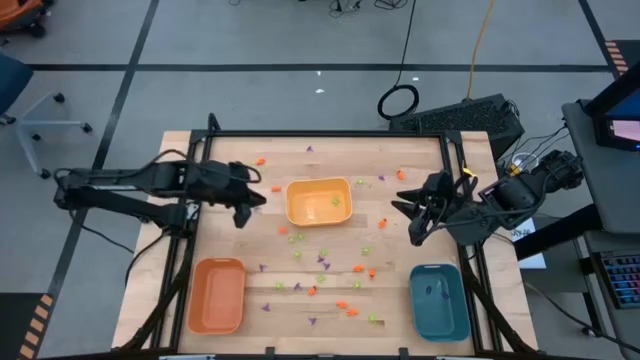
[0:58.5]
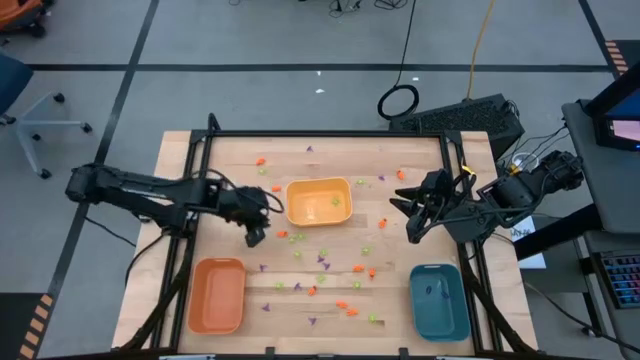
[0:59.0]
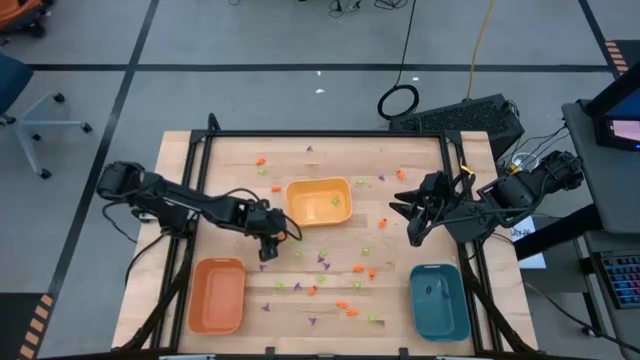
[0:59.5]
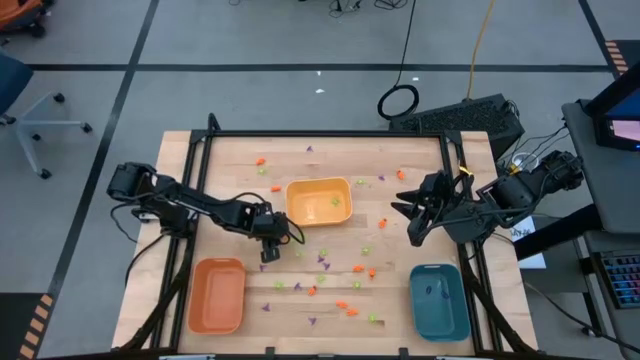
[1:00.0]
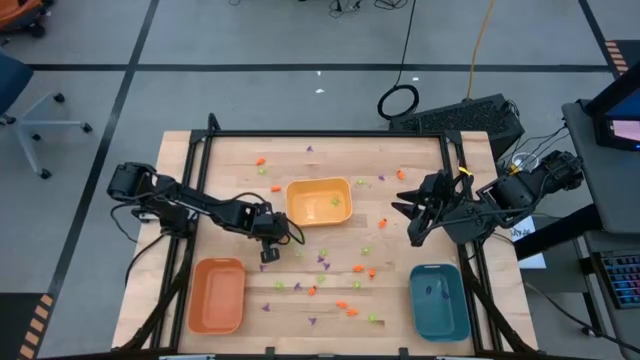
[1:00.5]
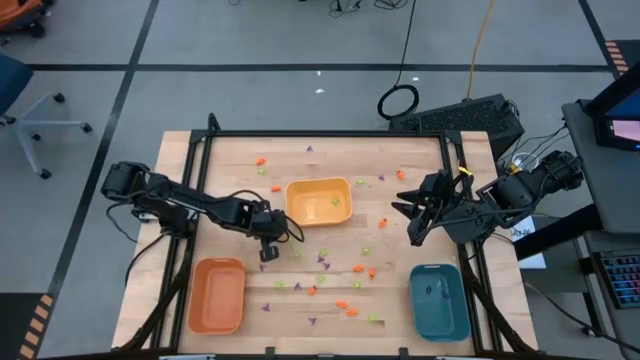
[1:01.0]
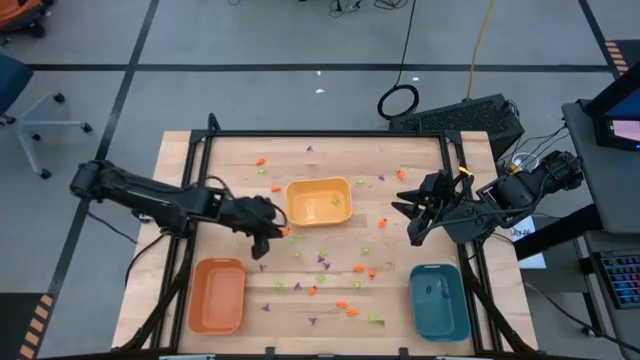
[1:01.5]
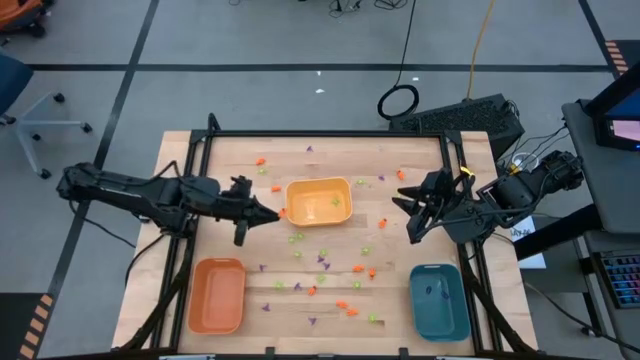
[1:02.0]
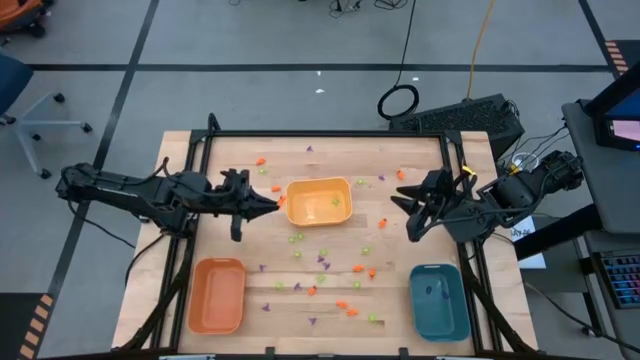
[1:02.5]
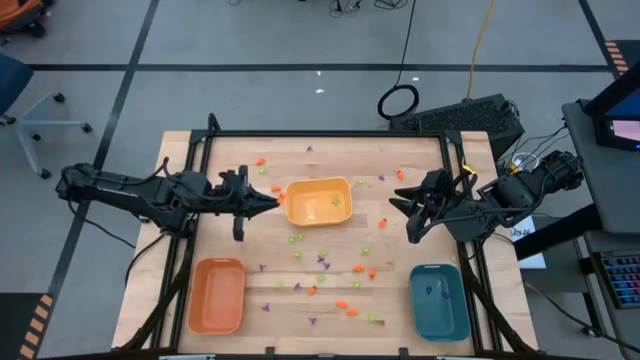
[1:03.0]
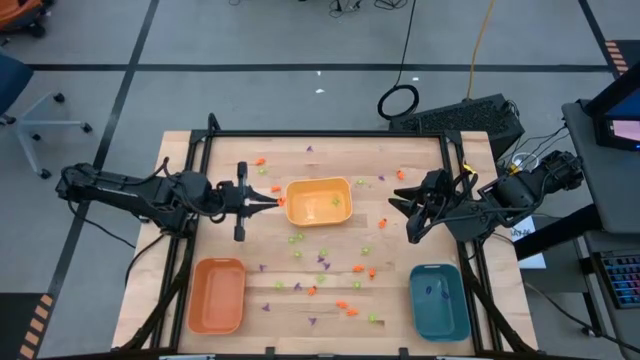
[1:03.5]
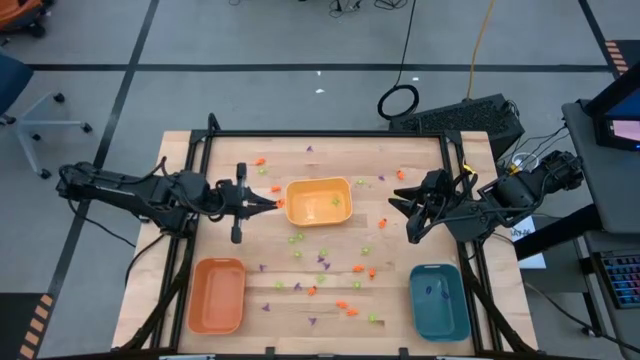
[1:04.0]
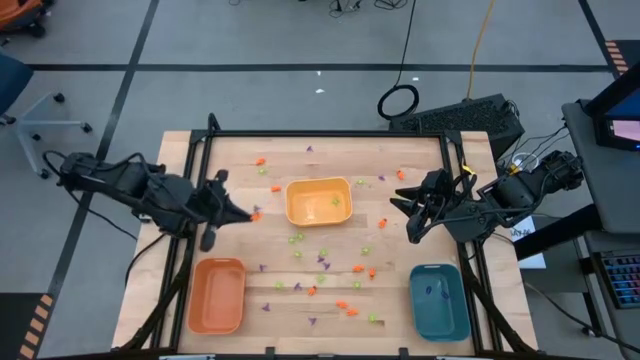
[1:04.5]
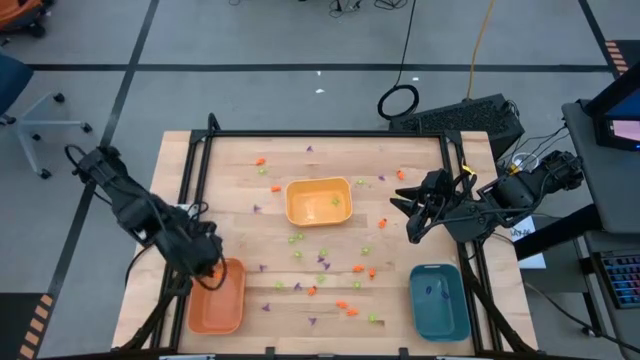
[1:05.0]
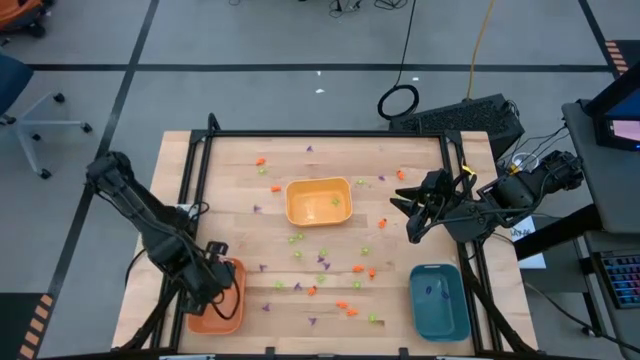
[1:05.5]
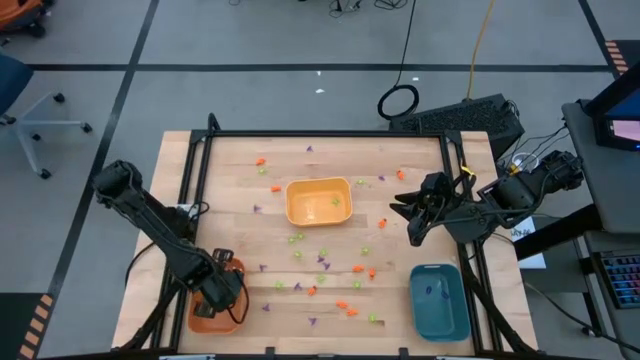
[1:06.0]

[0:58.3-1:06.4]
Task: Sort Halloween decoration
Put the orange skeleton toy into the orange bin

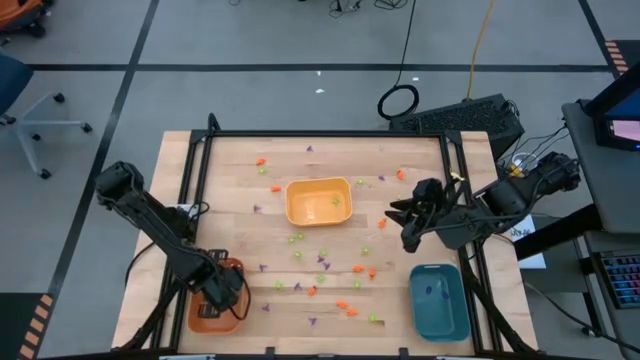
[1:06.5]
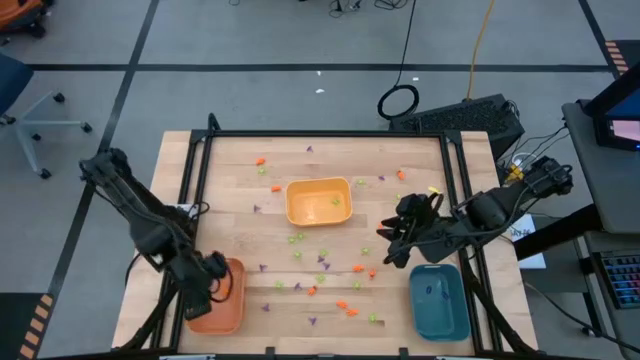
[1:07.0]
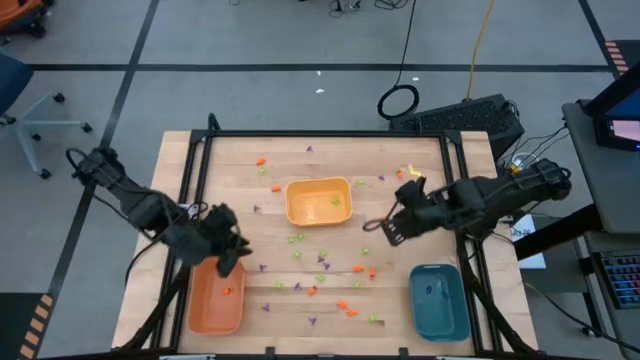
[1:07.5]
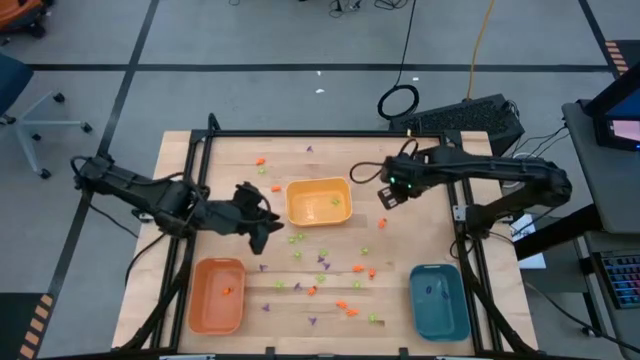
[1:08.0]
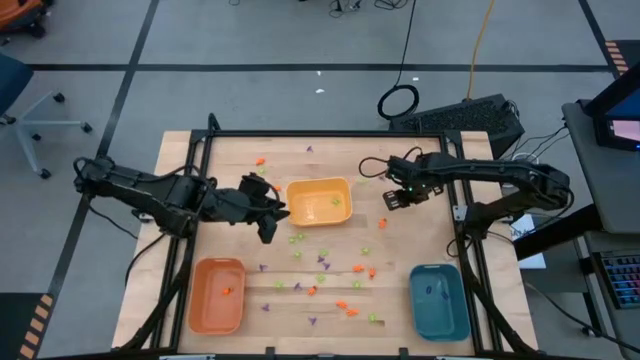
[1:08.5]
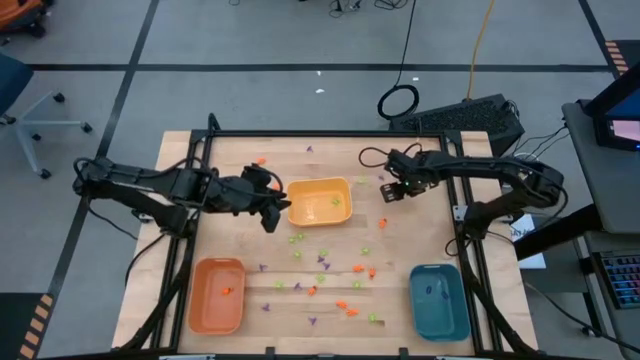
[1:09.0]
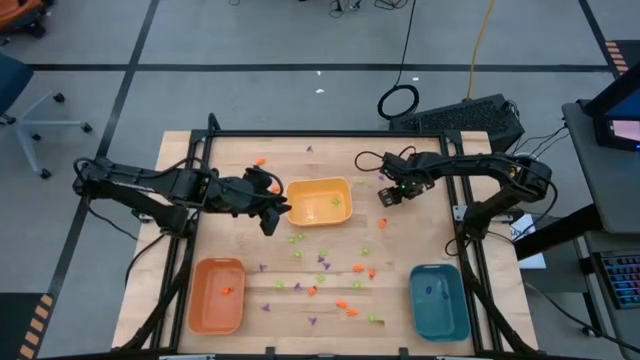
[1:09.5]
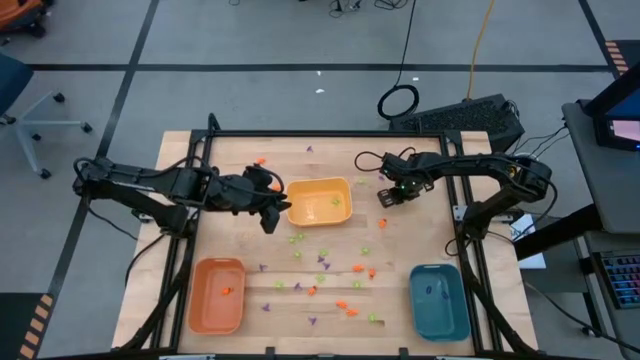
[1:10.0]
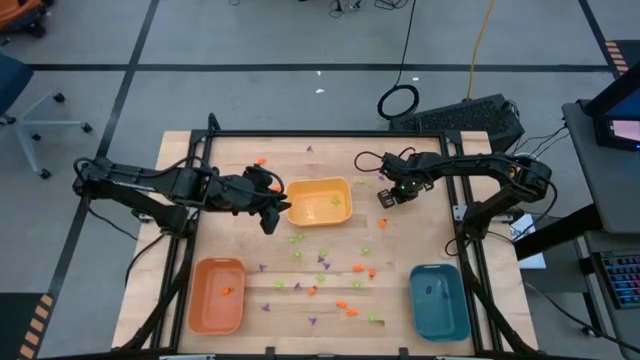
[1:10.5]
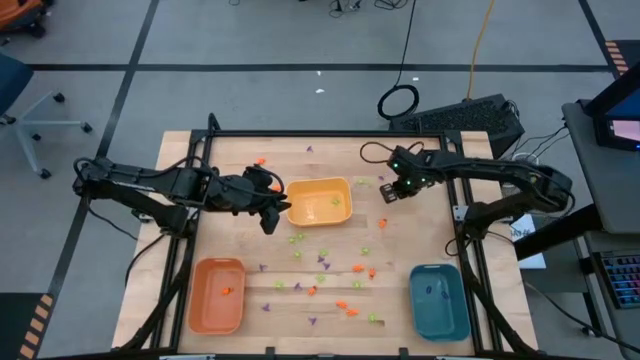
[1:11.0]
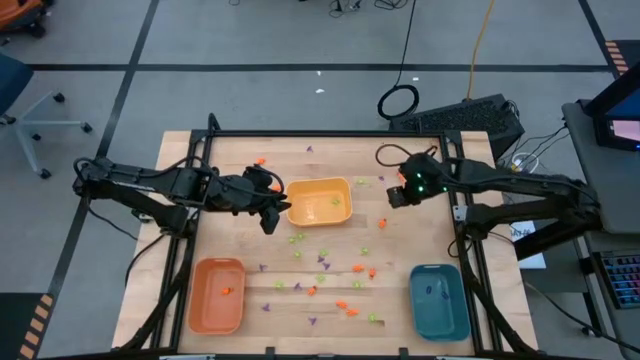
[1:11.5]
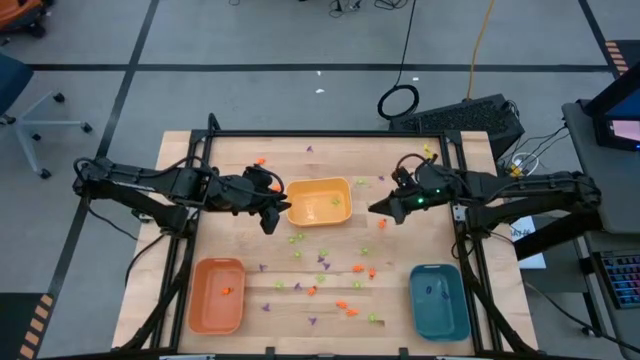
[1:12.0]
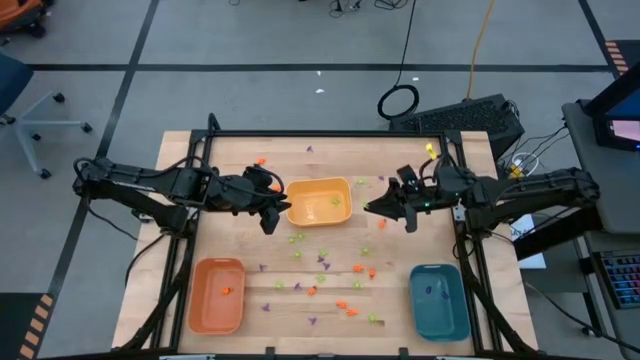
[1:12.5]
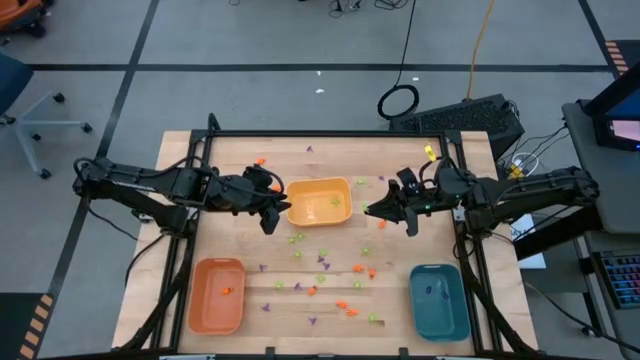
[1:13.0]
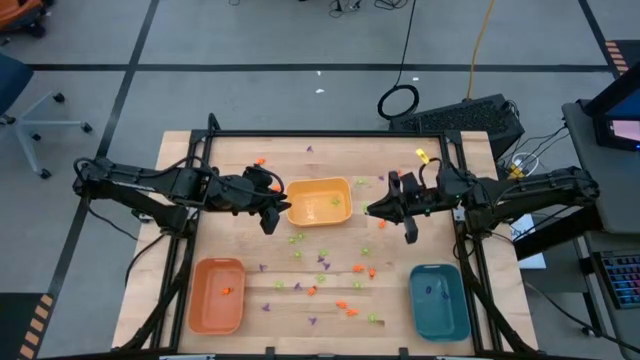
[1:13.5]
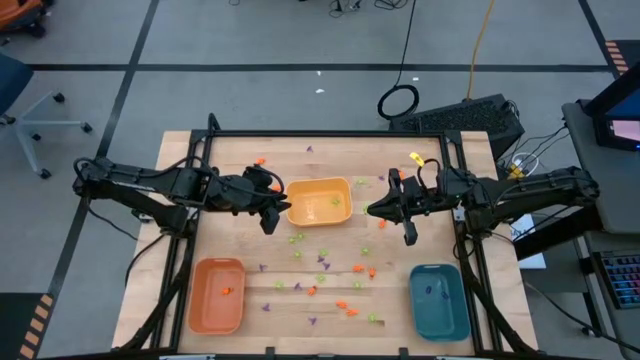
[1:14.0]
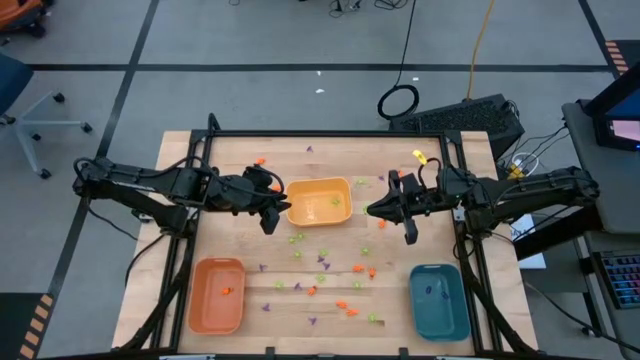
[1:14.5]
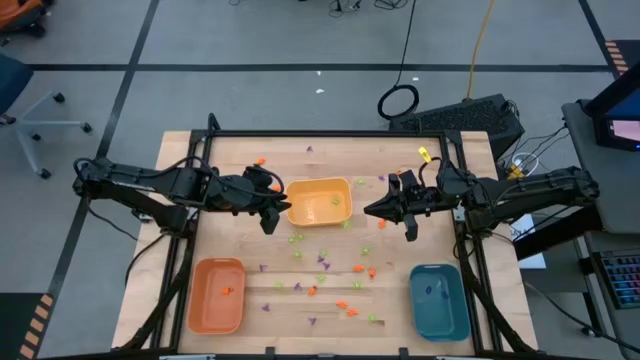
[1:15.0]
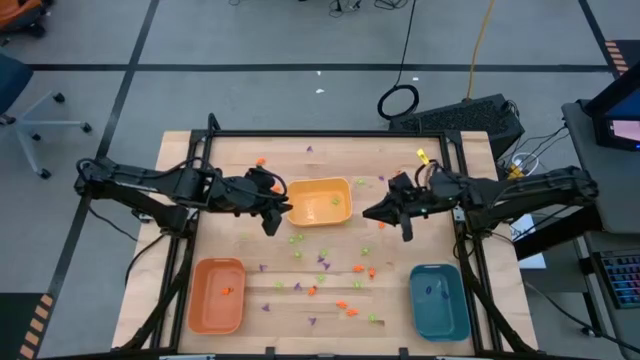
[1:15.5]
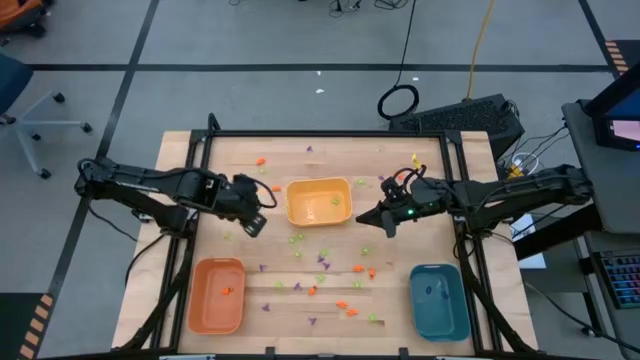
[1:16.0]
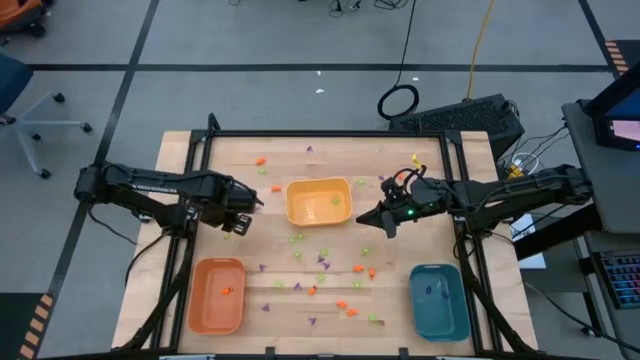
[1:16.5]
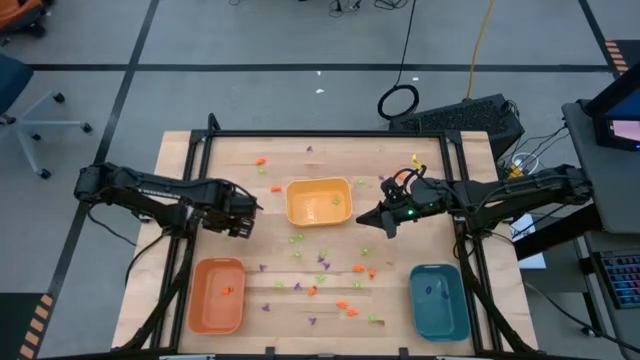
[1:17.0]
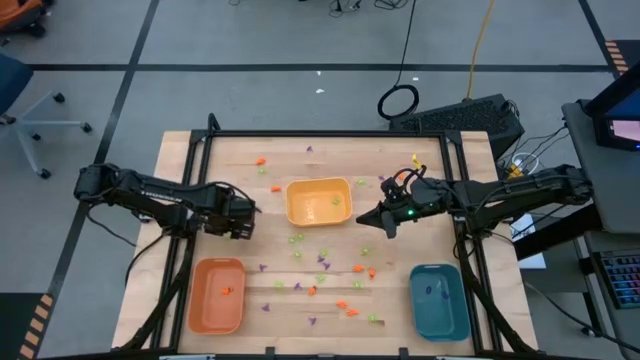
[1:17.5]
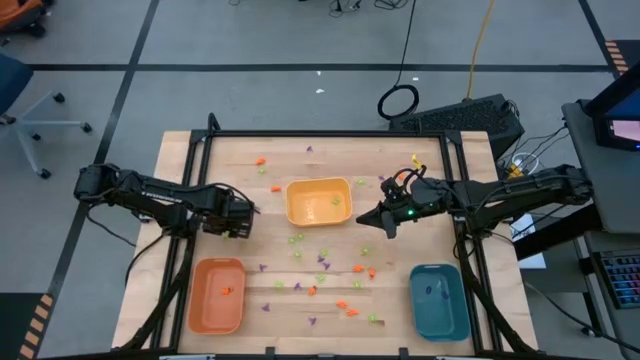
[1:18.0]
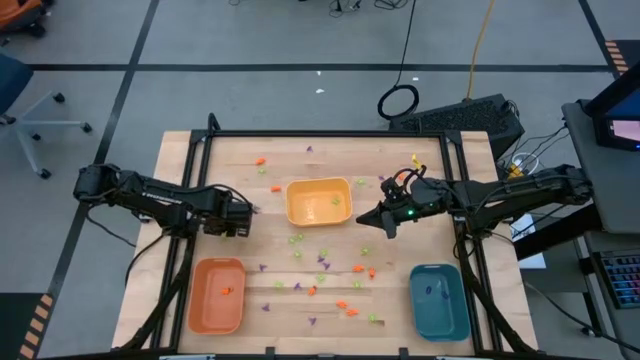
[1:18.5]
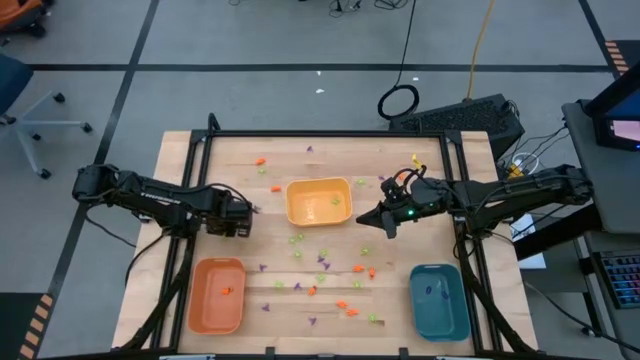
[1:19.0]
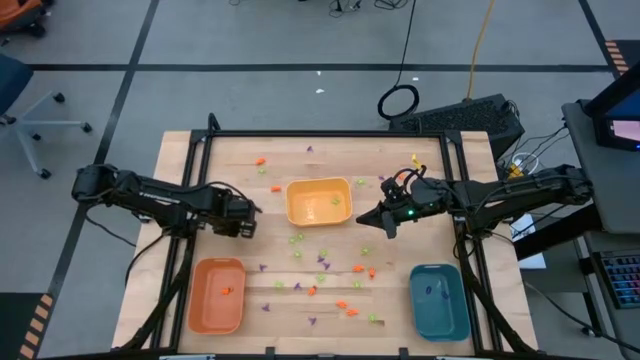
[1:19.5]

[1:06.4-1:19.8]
Put the green spider toy into the yellow bin

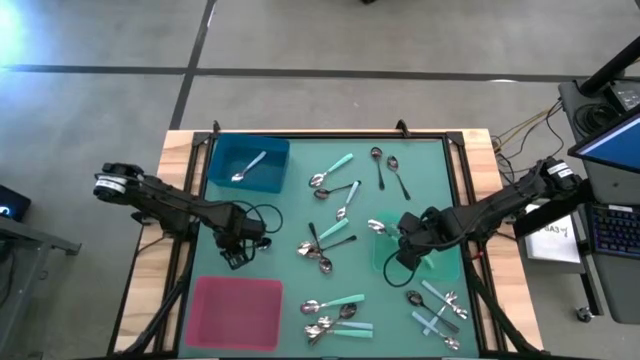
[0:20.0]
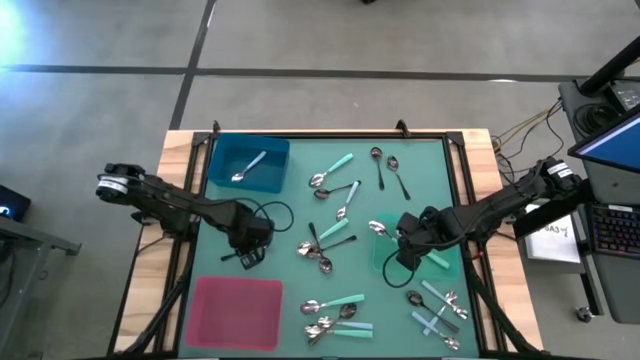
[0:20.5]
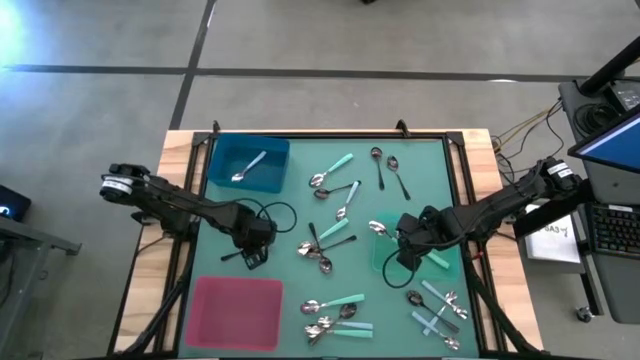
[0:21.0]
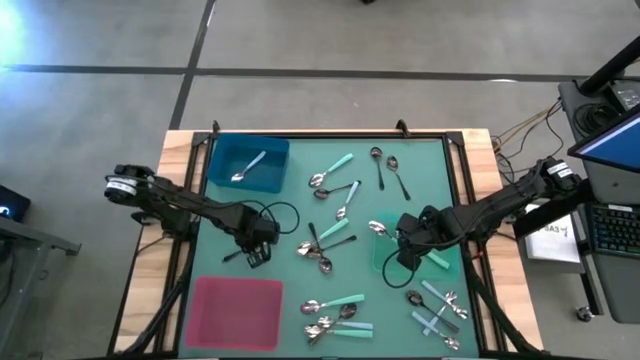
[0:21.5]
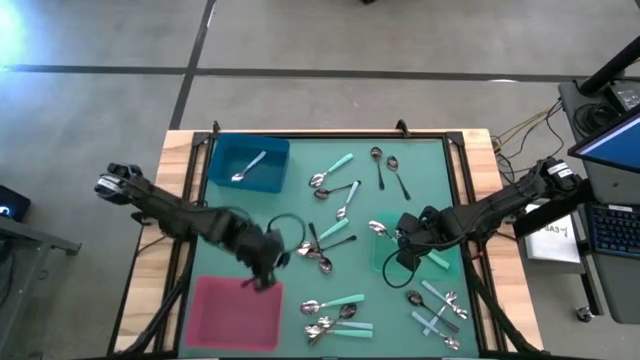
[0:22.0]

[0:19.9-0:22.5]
Task: Sort silverware by color (type)
Put the black spoon into the pink bin
